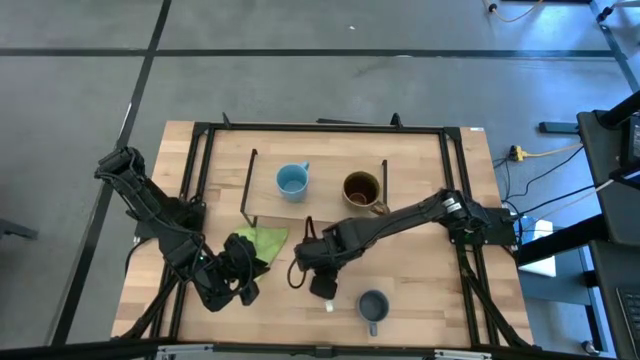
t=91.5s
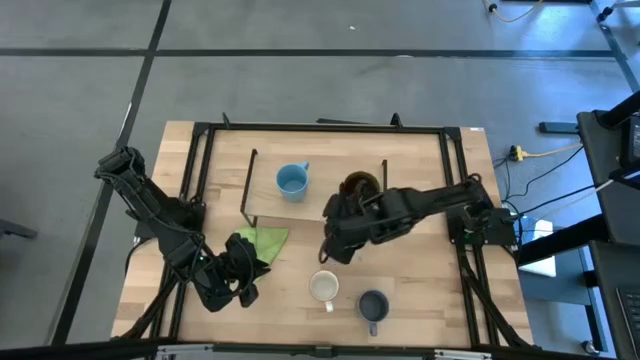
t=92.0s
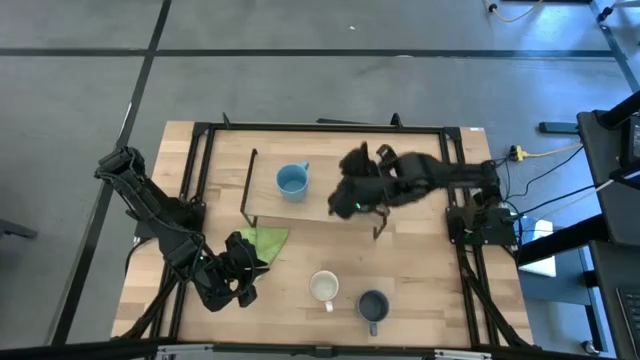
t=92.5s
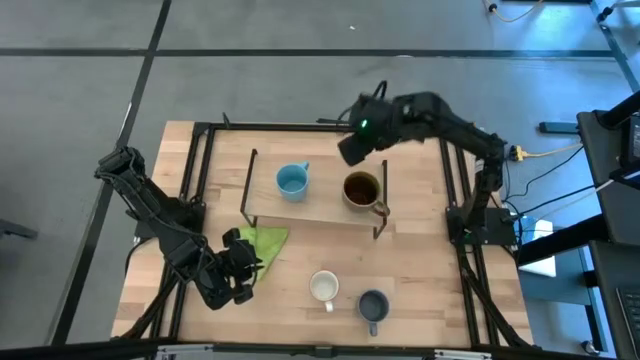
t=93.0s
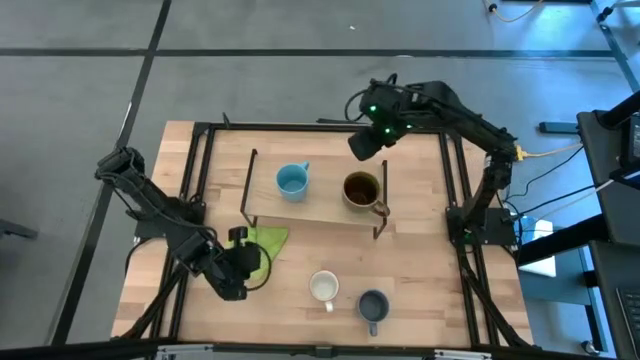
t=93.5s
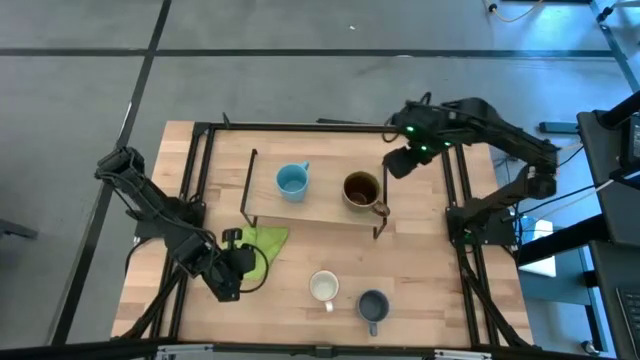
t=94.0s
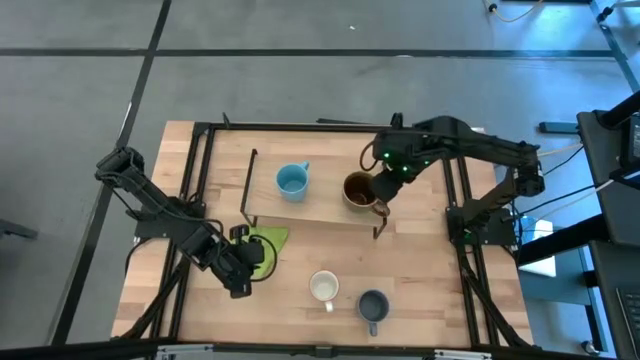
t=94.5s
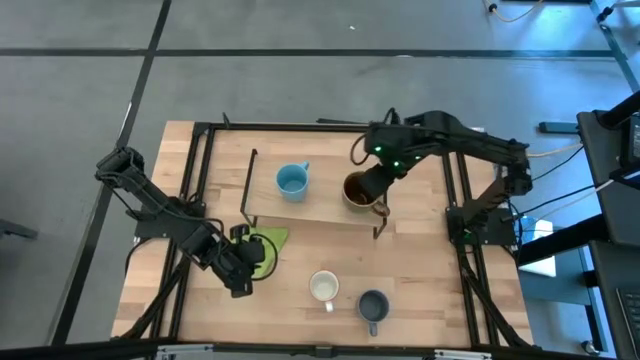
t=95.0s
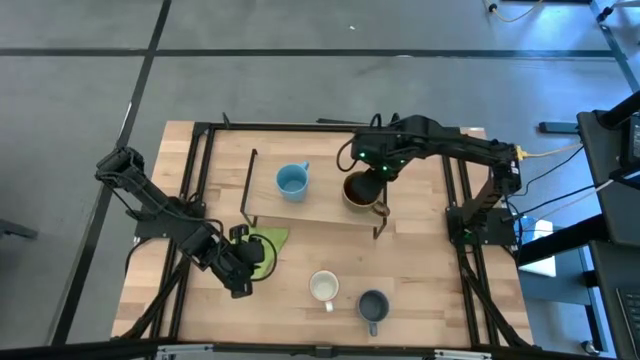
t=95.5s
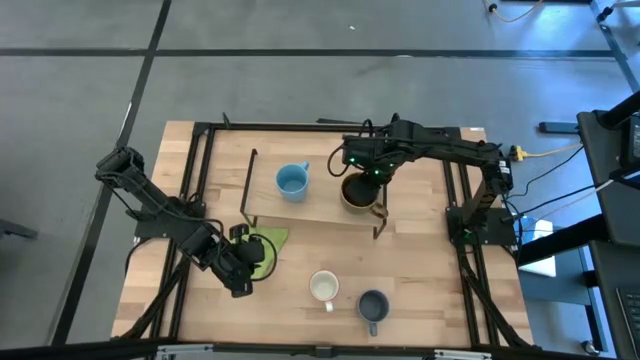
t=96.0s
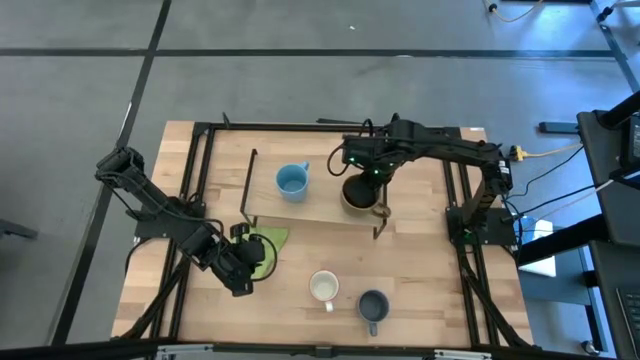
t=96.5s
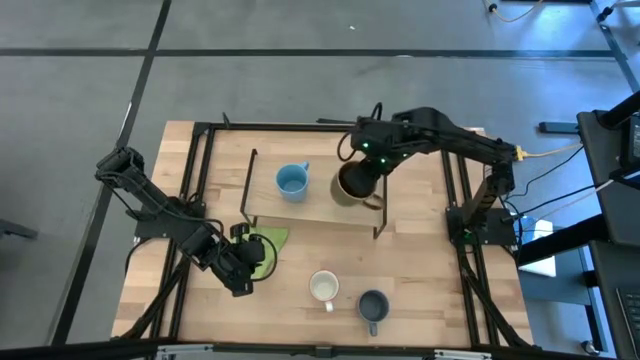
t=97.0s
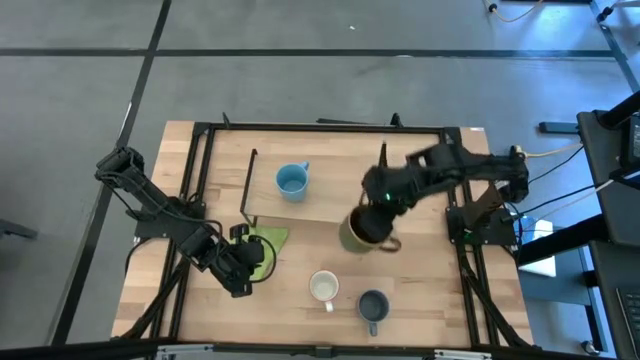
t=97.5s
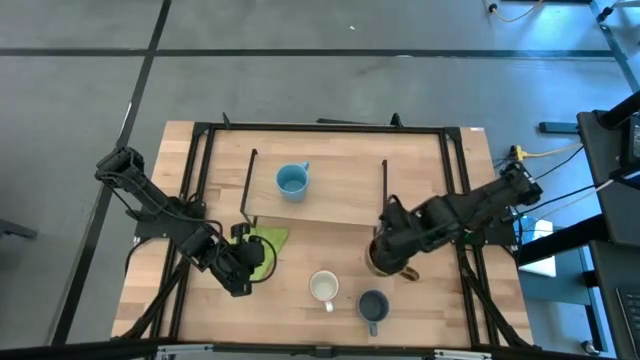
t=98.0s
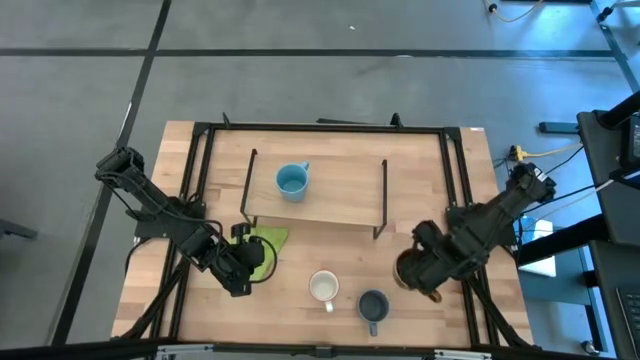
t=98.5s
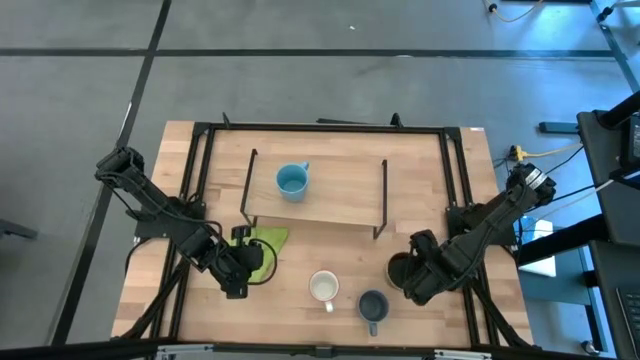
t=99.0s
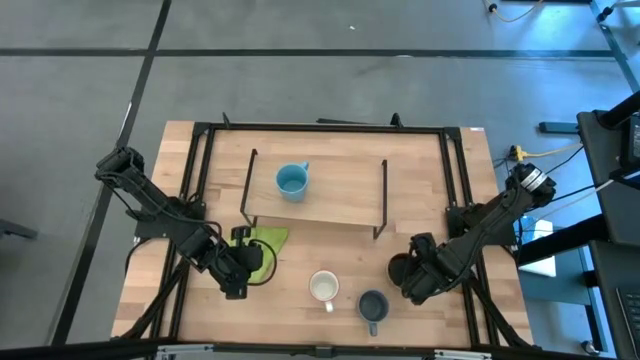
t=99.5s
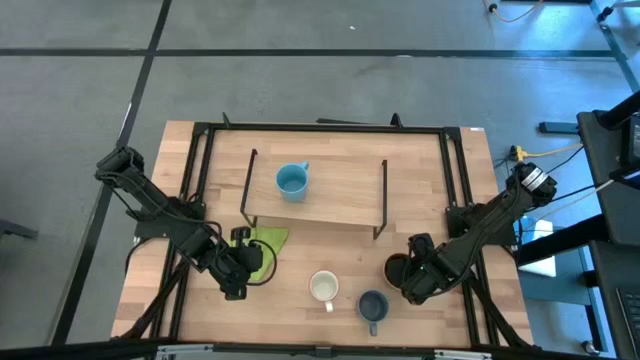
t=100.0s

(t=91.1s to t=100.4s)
Task: Stack small to large cups/mugs on shelf
Remove the green mug from the shelf

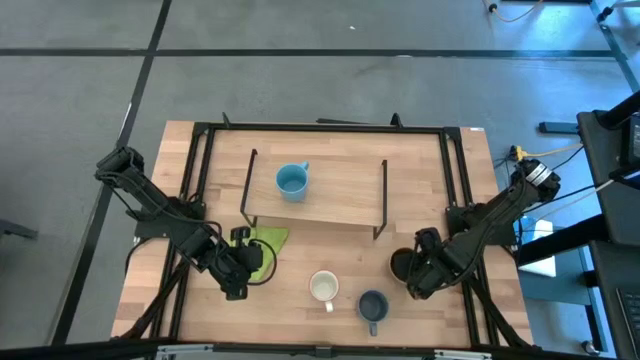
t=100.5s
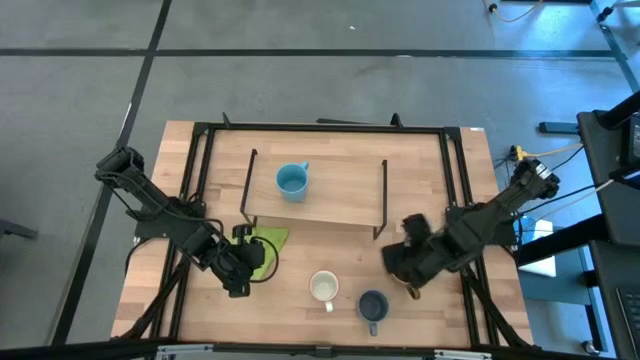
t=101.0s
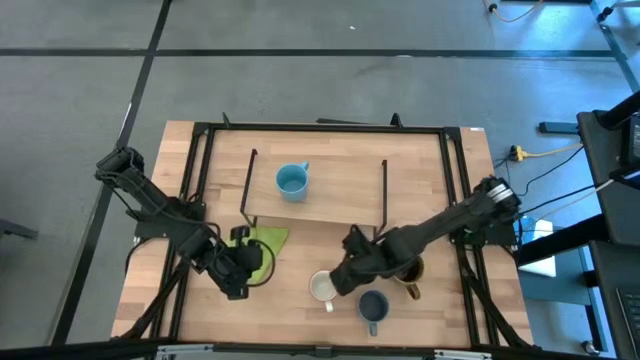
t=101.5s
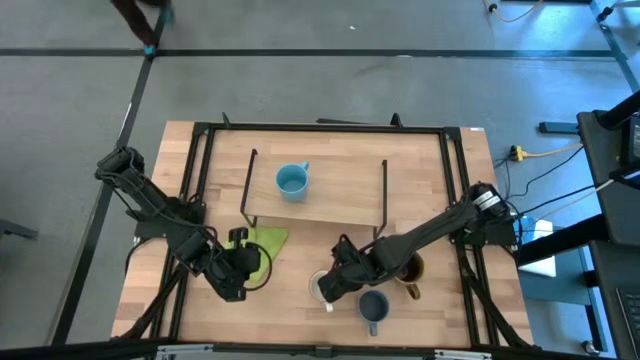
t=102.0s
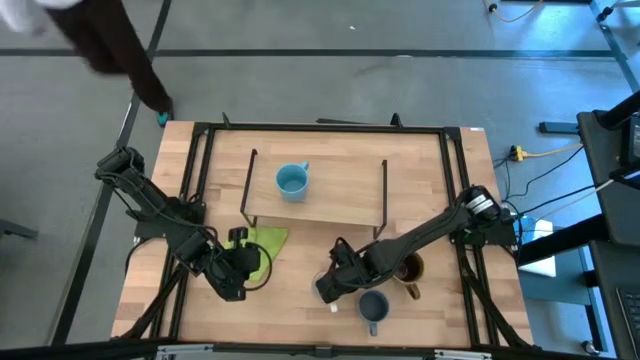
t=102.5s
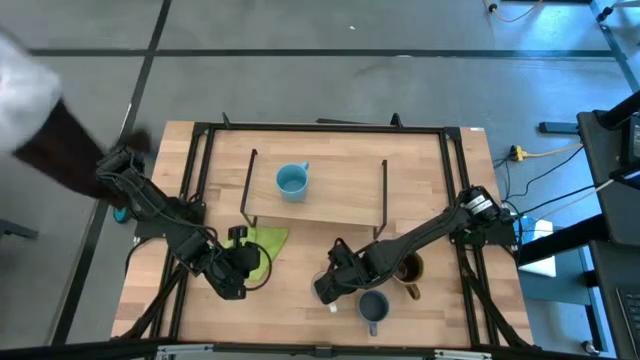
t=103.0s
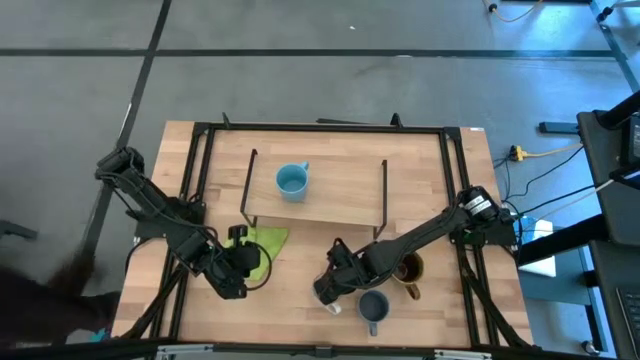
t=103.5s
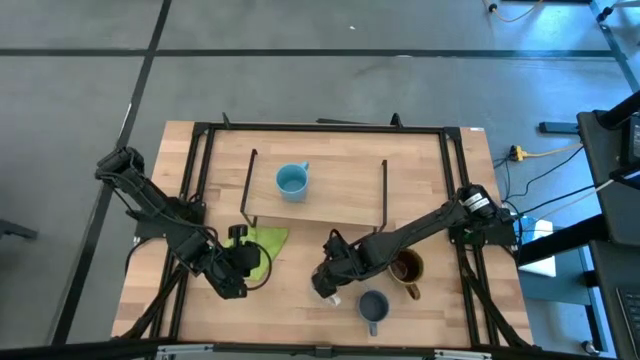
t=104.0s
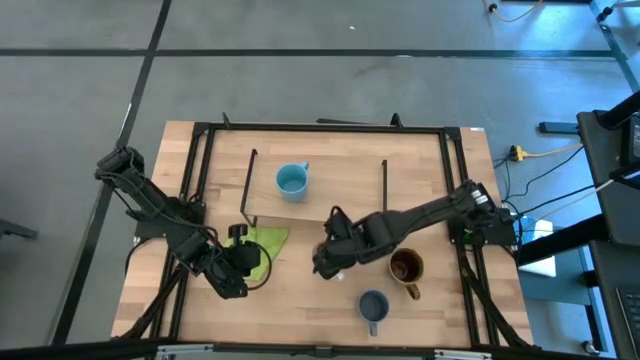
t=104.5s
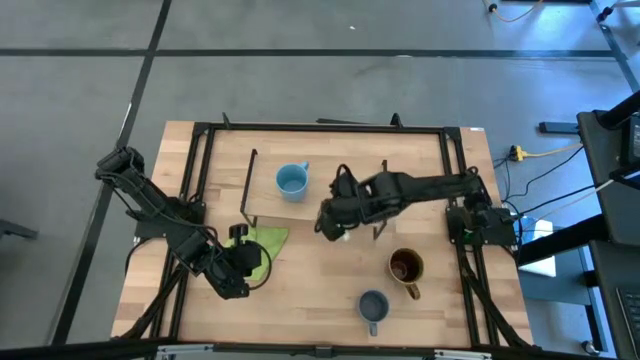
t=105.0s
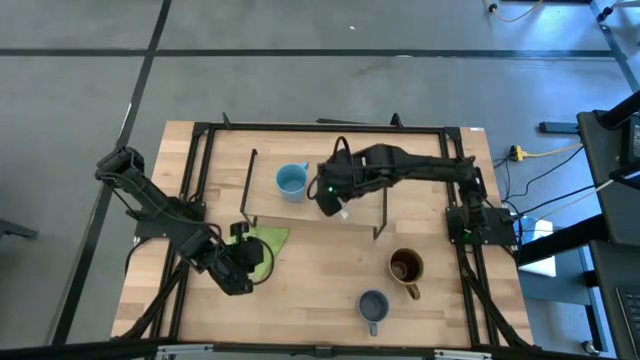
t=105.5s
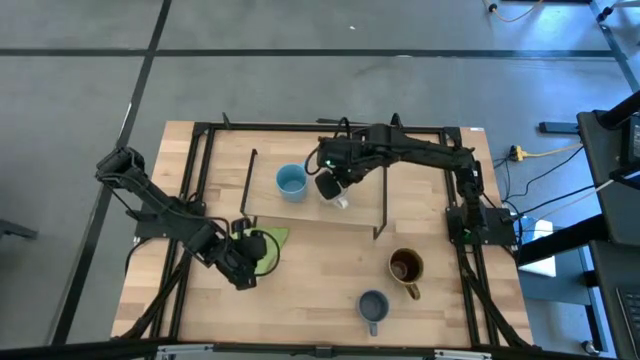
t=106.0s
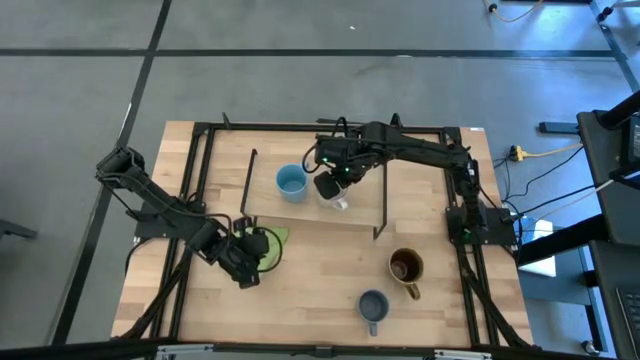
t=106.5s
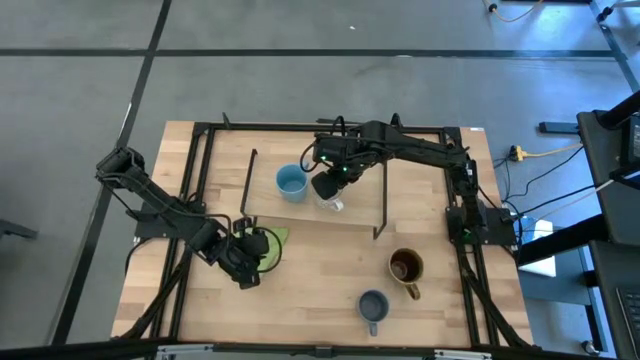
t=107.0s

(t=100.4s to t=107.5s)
Put the gray patterned mug on the shelf

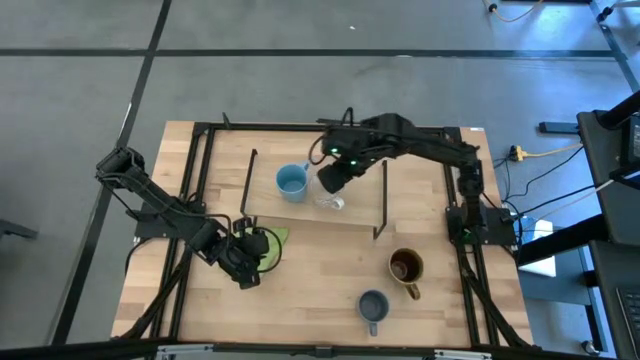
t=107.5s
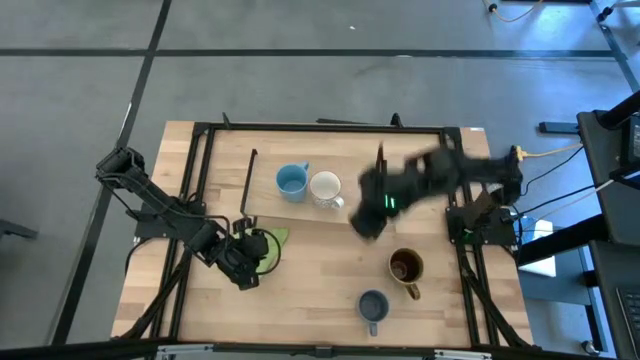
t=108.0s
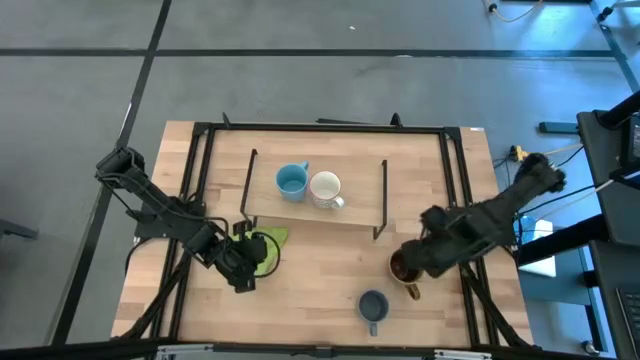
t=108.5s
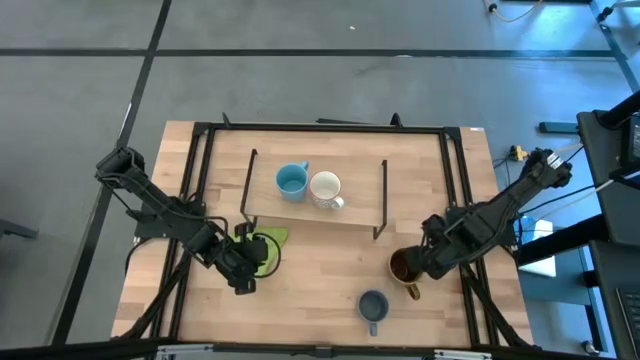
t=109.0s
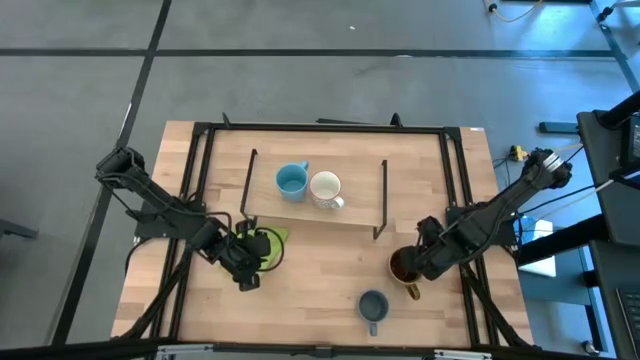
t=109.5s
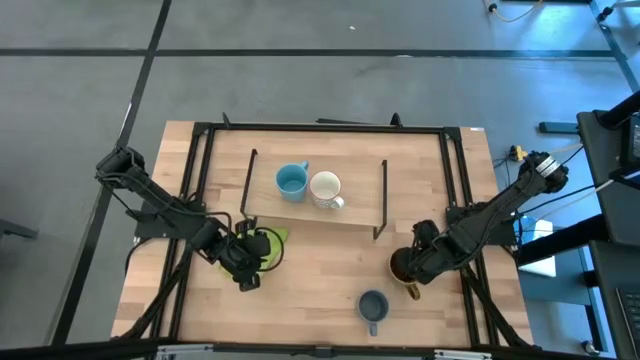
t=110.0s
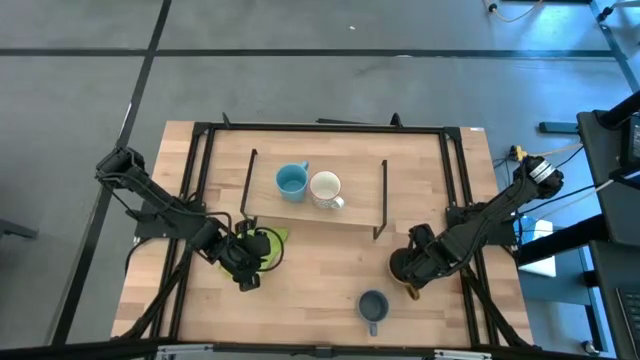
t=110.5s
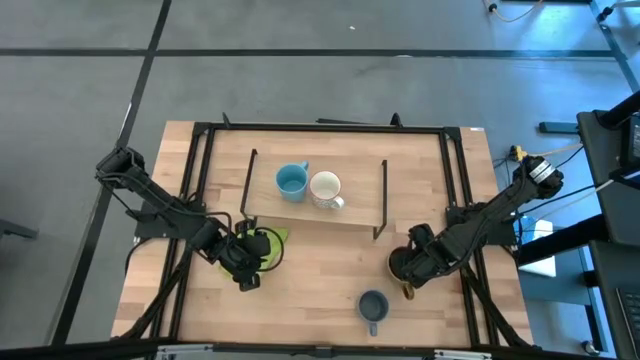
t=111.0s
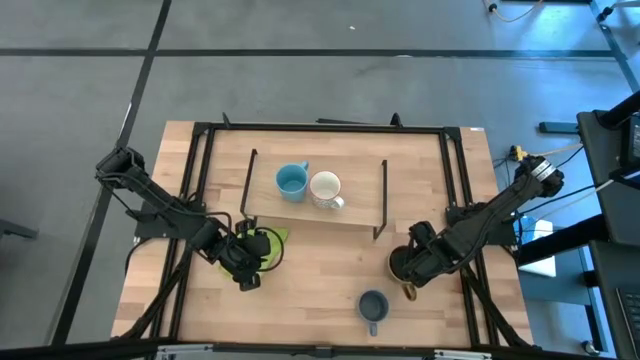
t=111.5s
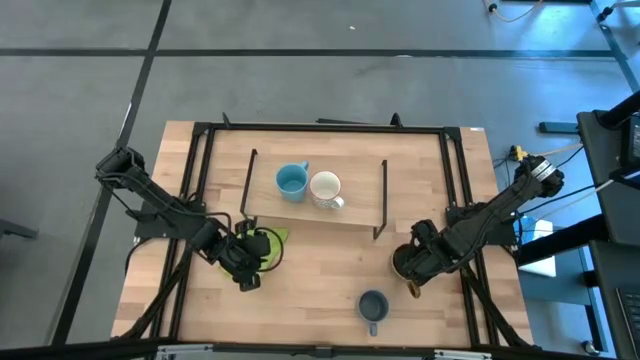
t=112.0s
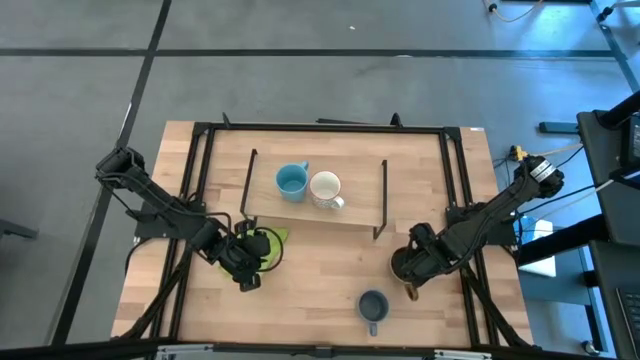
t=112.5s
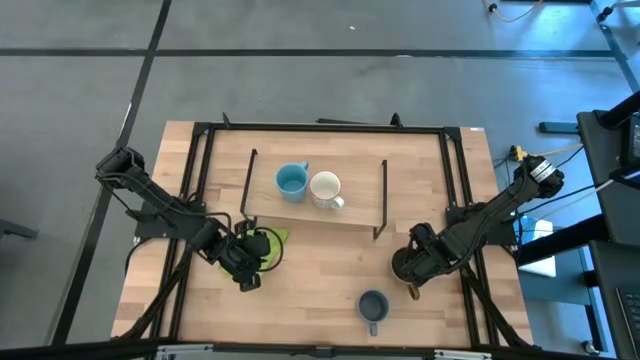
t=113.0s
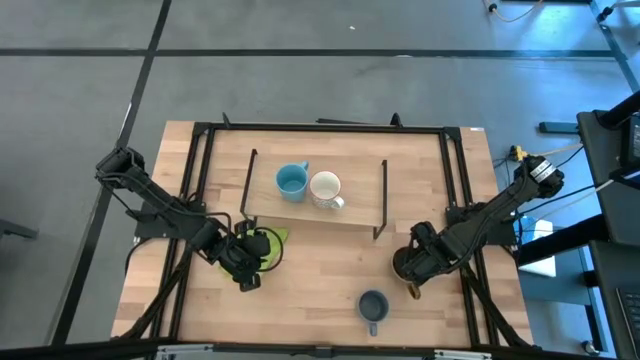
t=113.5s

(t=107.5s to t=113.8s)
Put the green mug on the shelf
